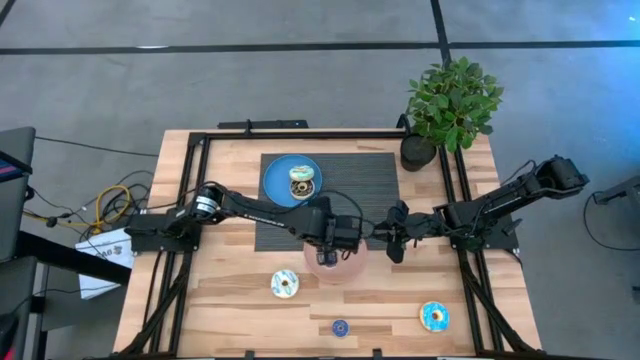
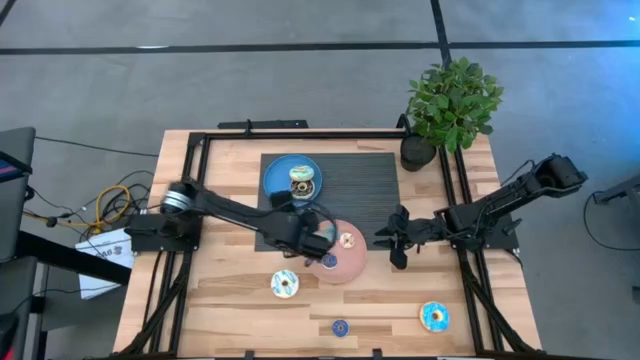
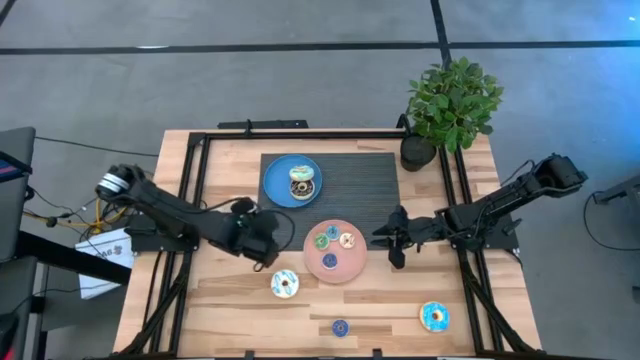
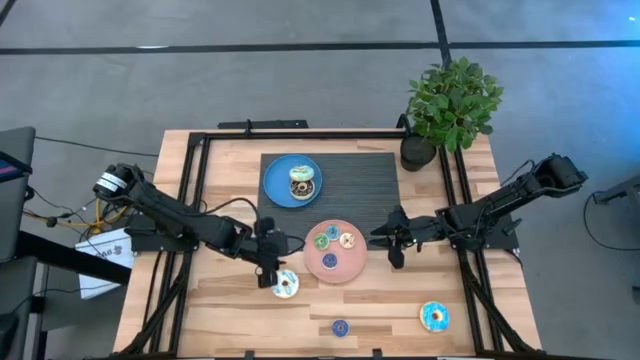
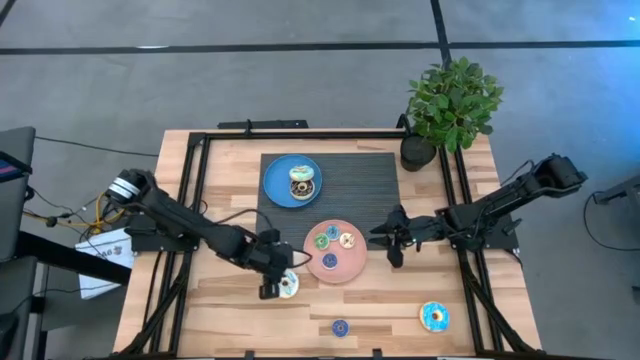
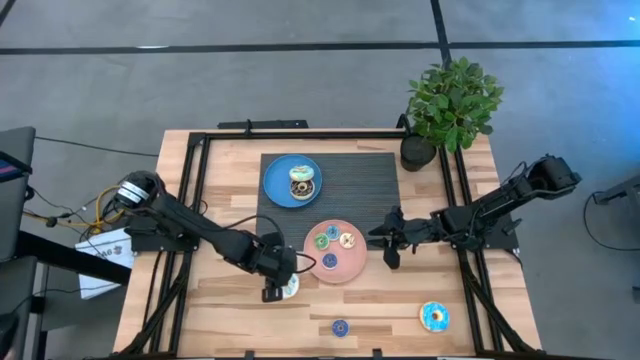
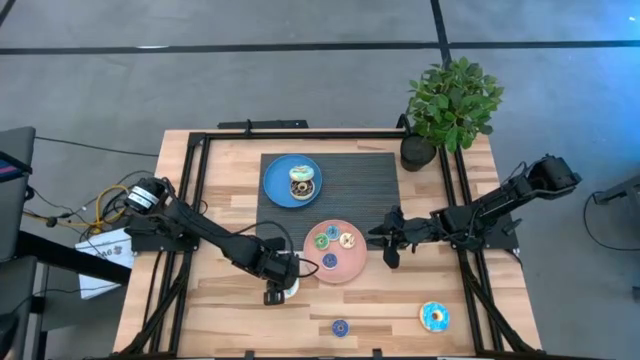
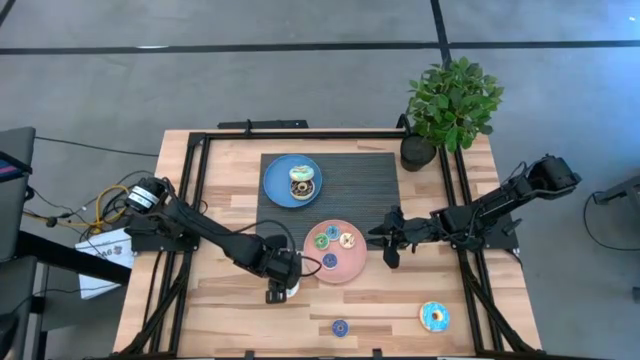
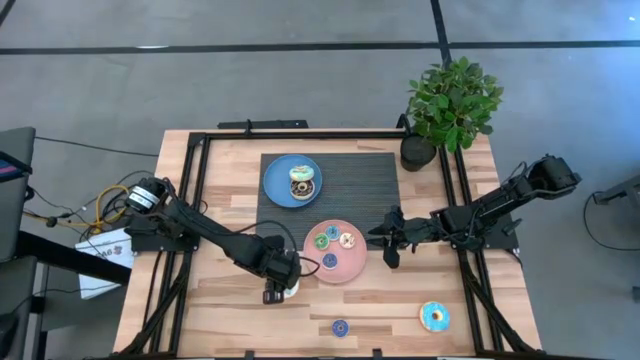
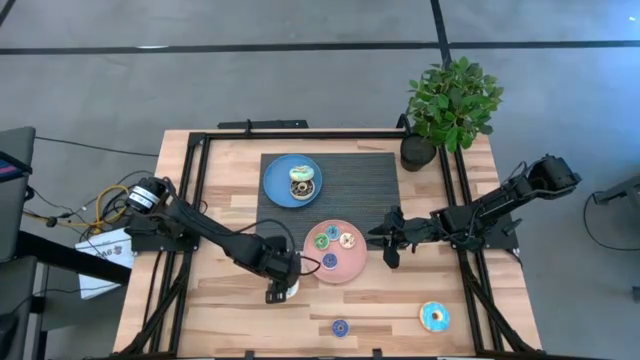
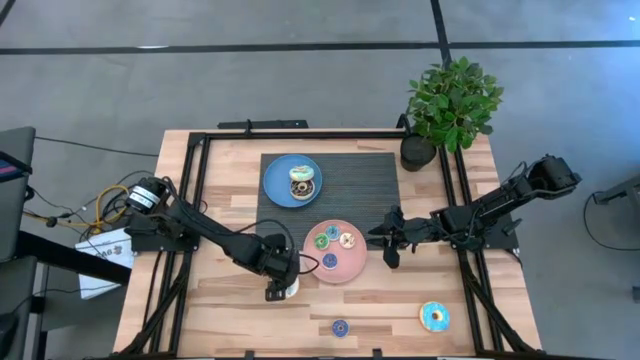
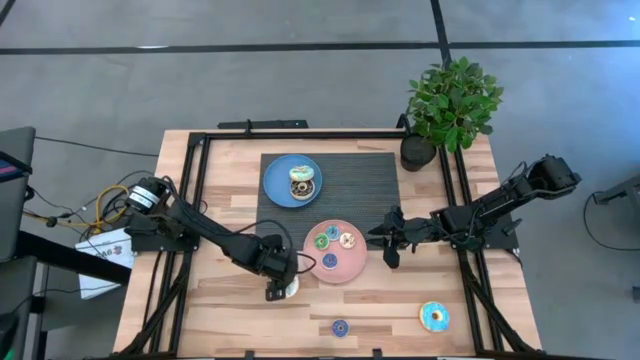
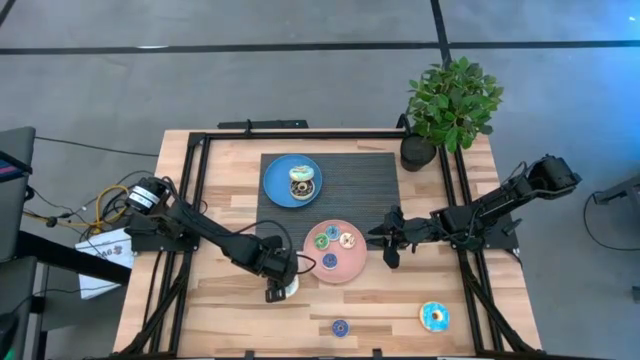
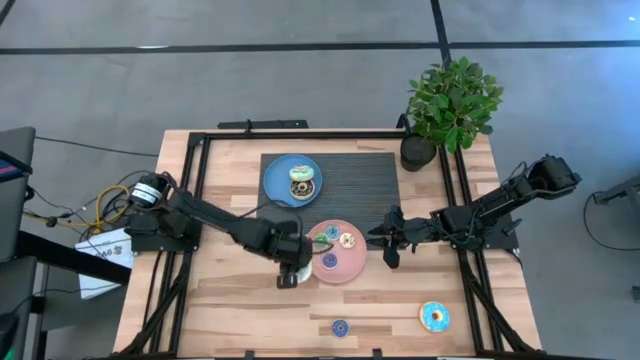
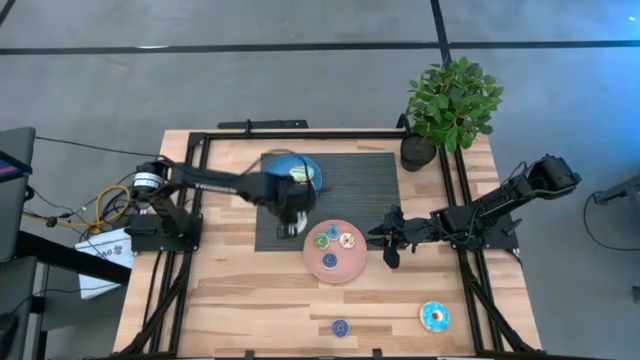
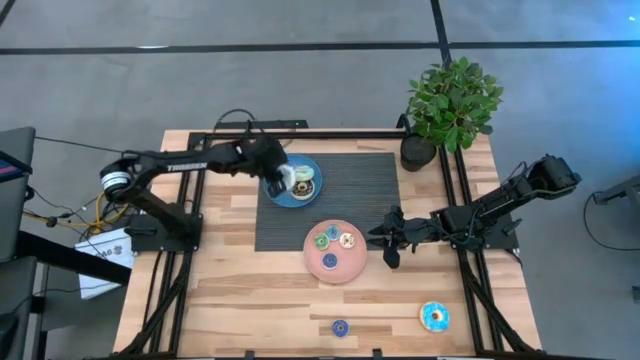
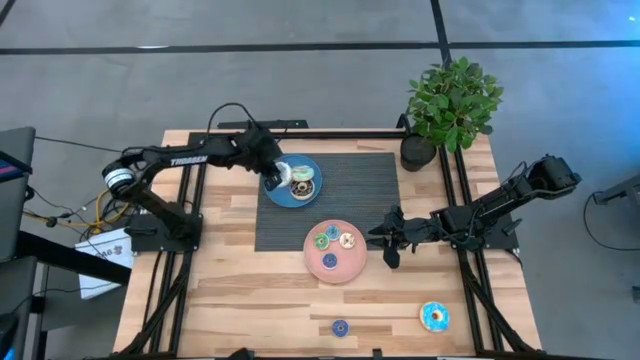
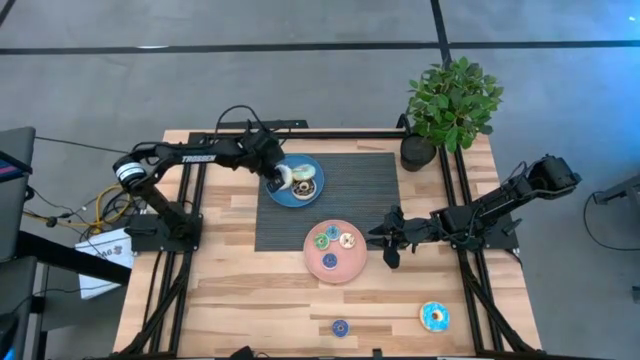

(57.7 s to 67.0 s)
Task: Pick & Place donuts
Put the large white donut on the blue plate

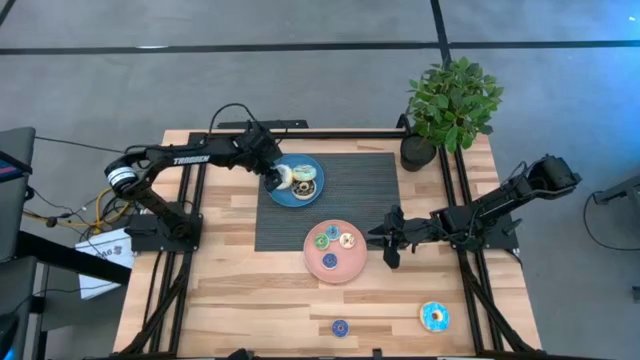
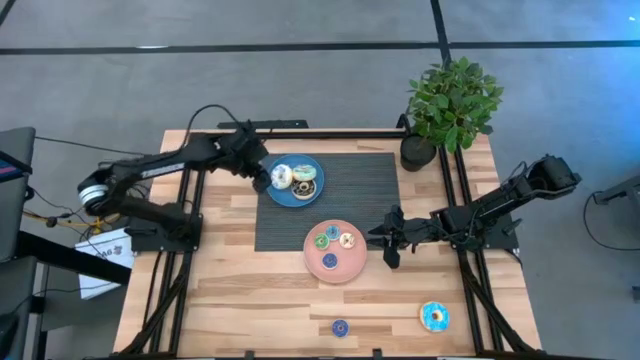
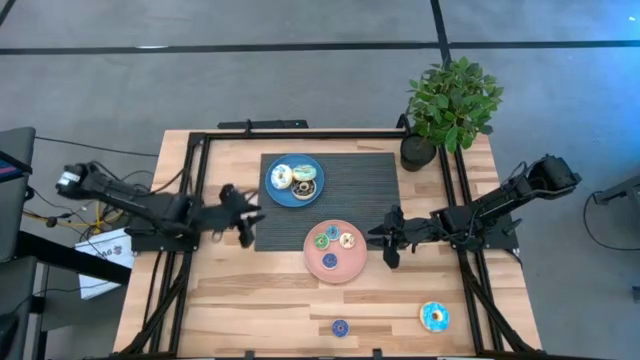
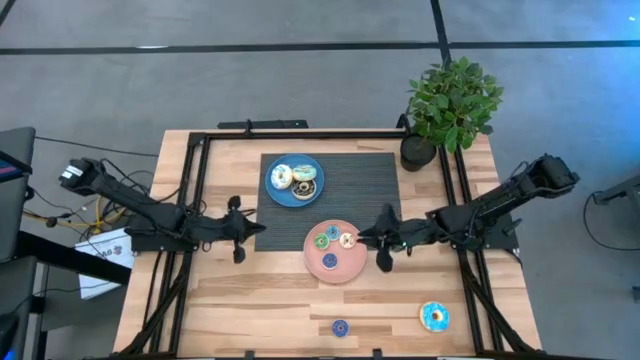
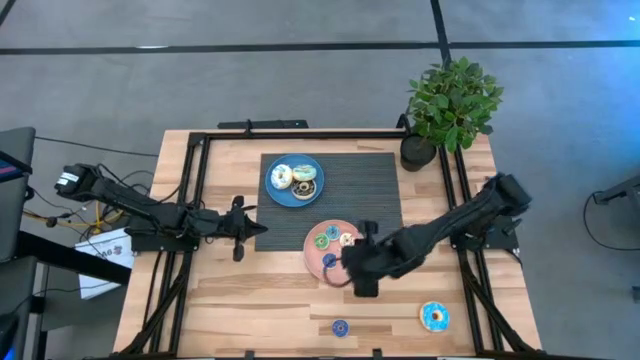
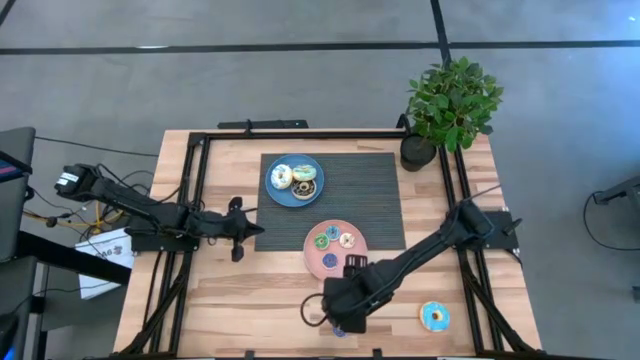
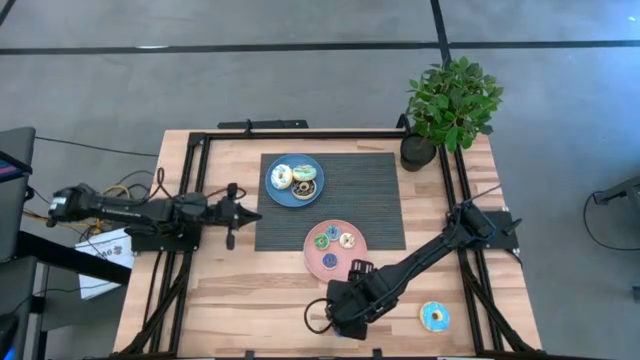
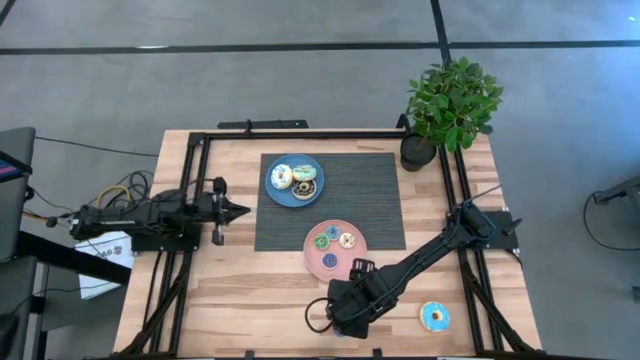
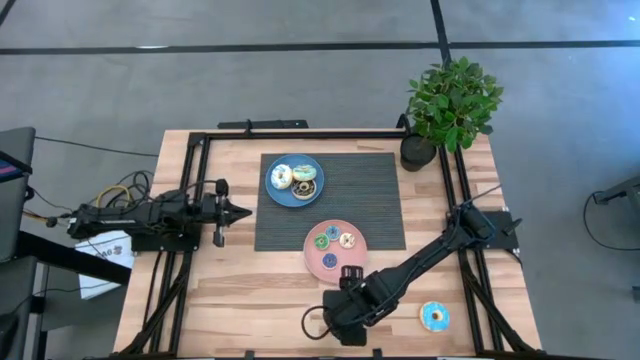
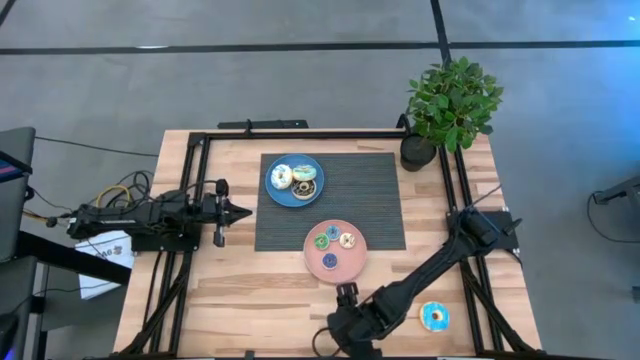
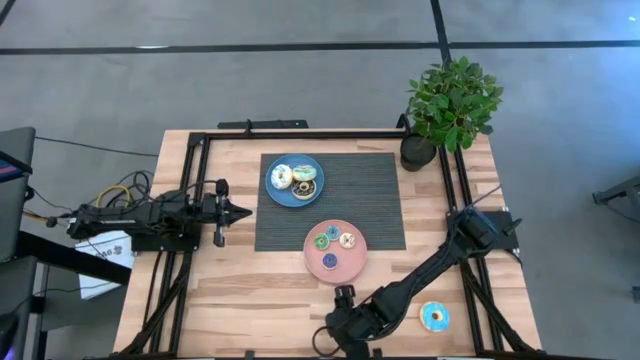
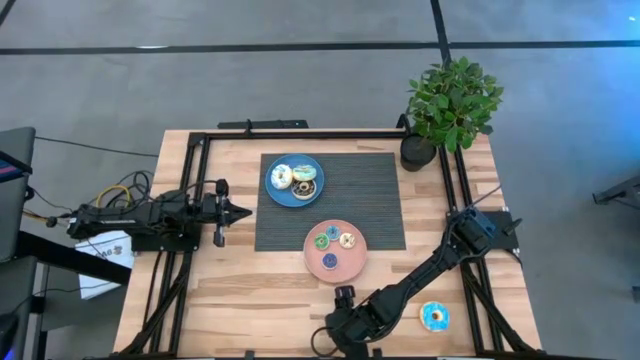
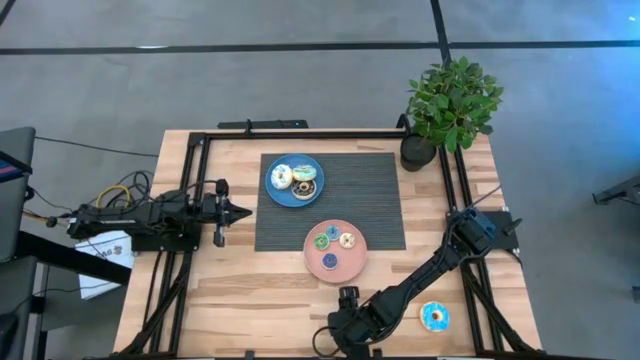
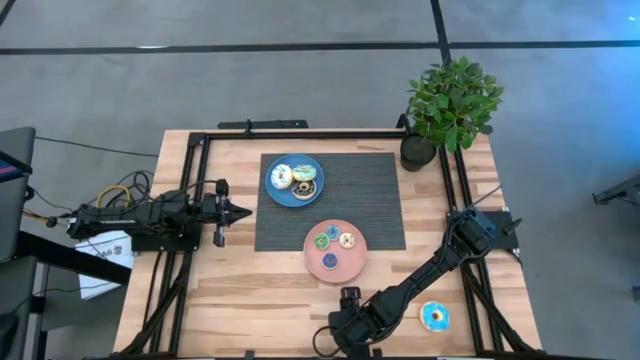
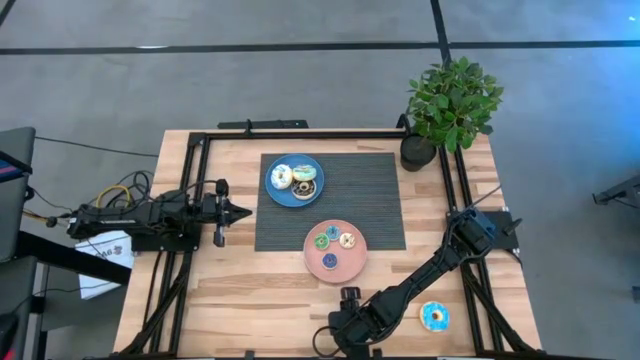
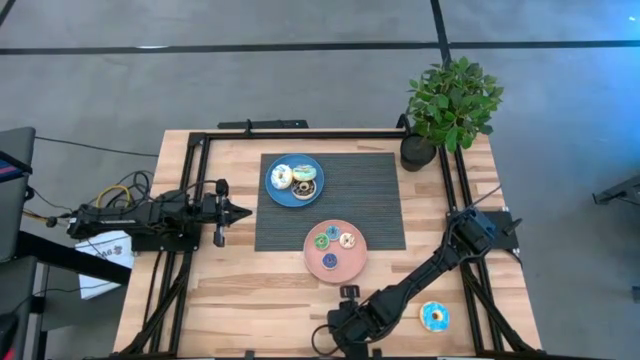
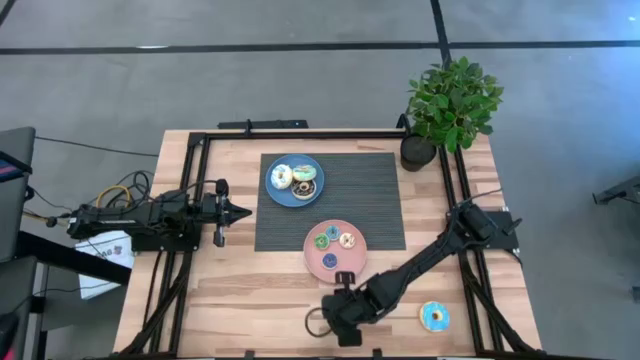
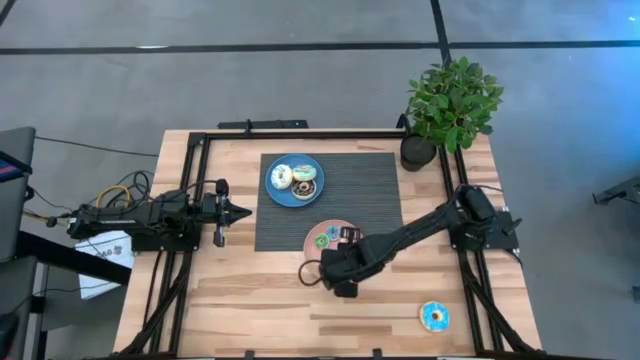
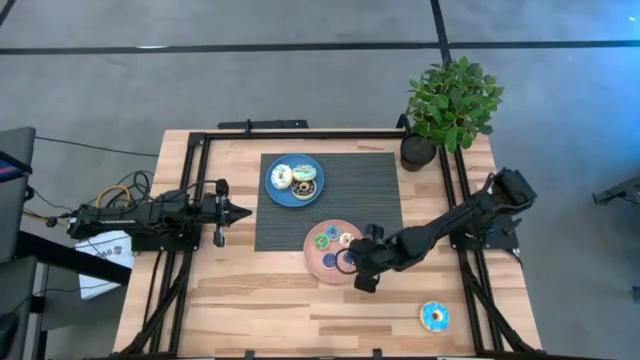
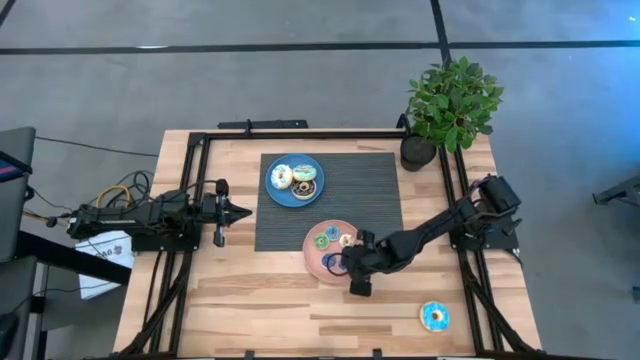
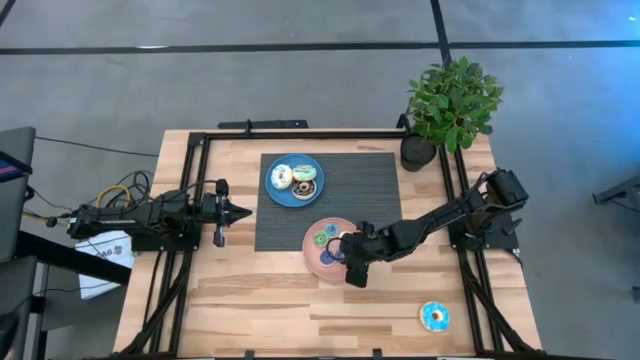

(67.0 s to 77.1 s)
Put the small violet donut on the pink plate

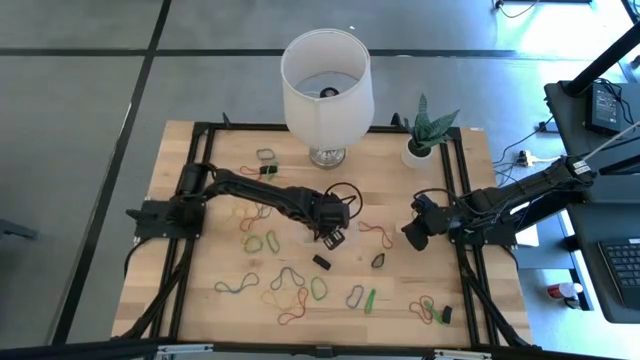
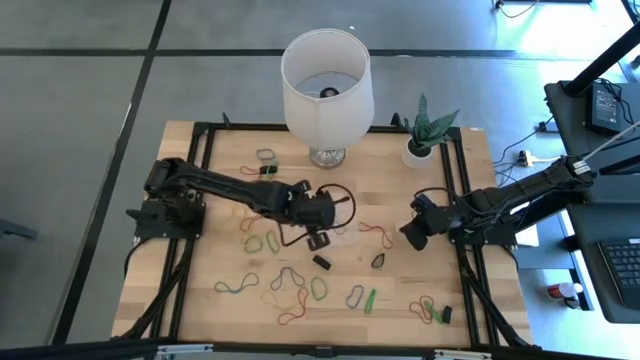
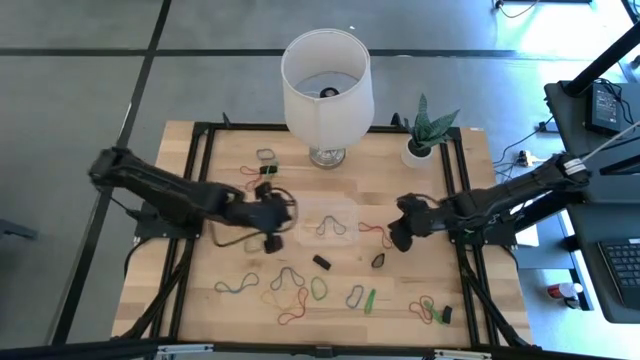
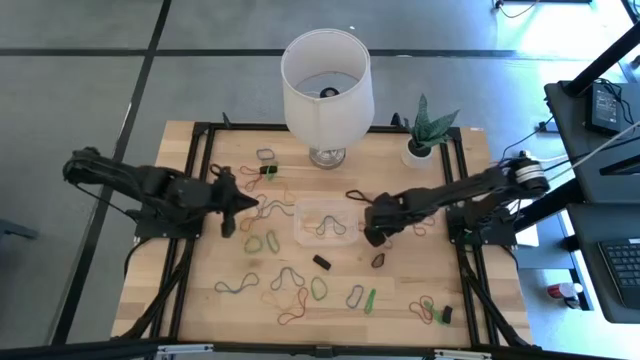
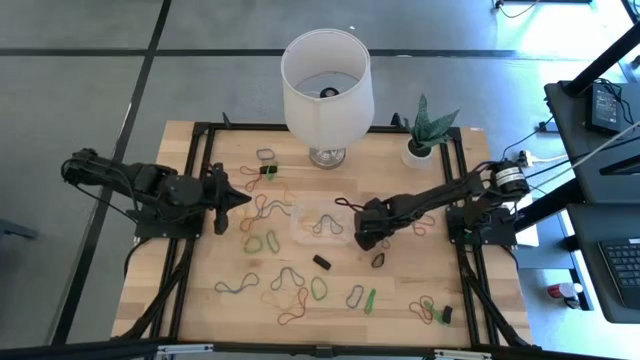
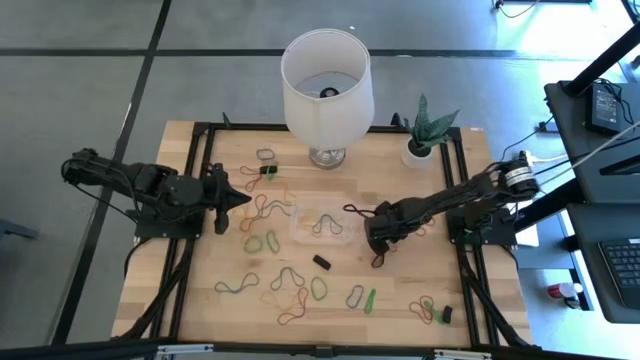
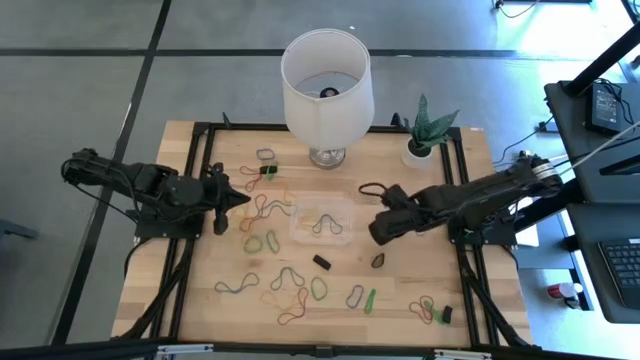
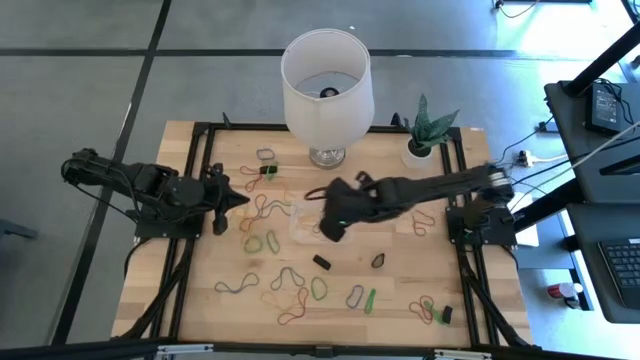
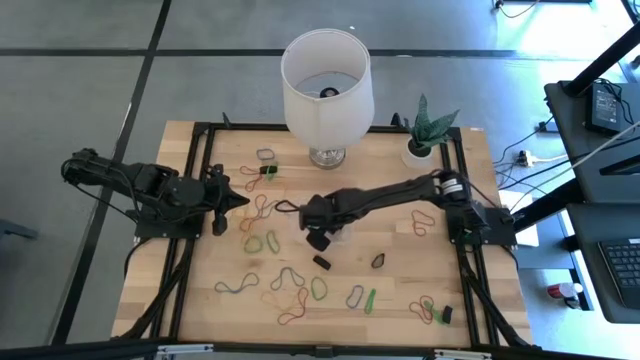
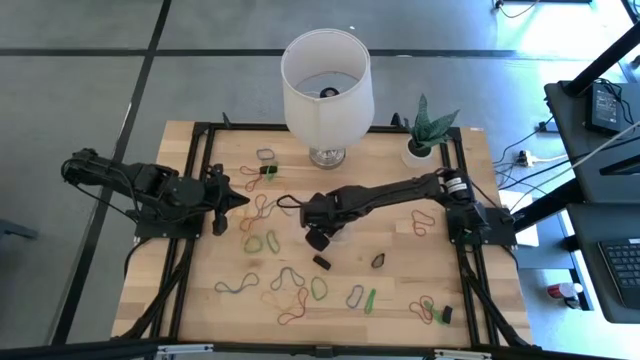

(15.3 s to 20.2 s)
Task: Pick and place rubber bands into bin
Put the red rubber band into the container
